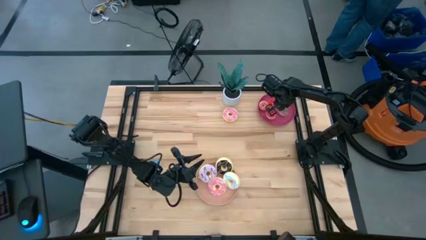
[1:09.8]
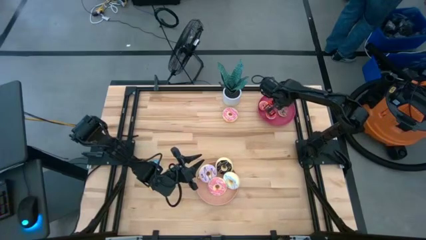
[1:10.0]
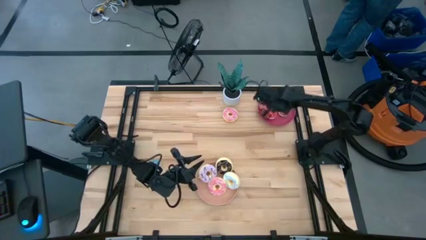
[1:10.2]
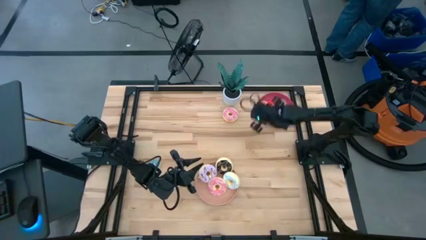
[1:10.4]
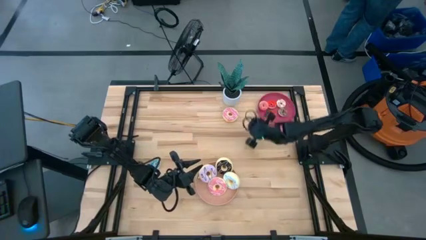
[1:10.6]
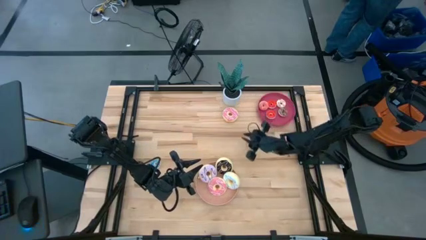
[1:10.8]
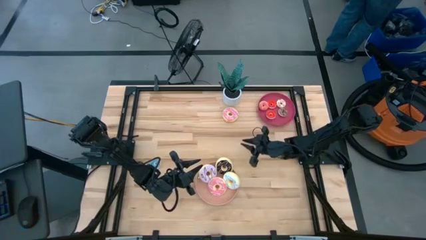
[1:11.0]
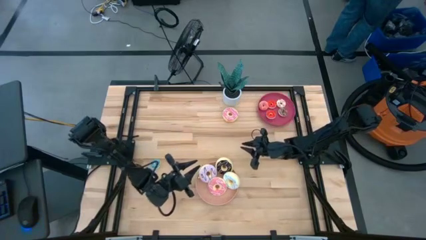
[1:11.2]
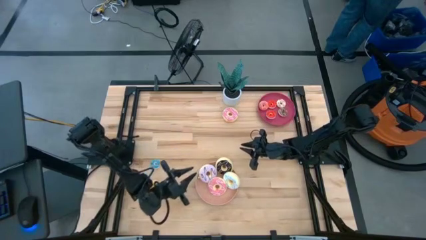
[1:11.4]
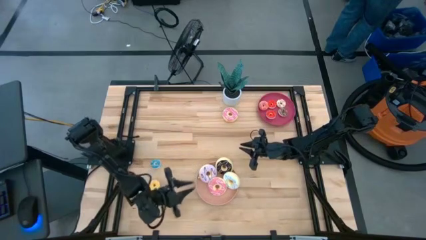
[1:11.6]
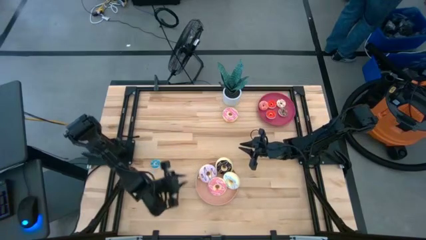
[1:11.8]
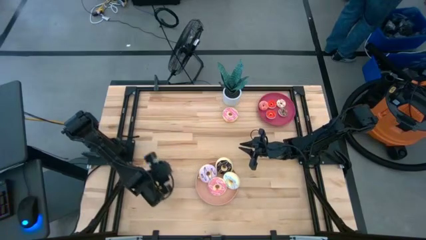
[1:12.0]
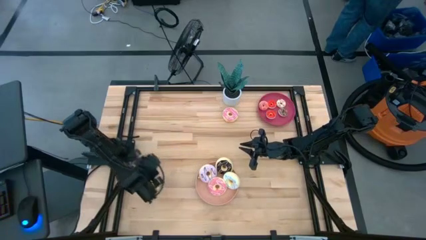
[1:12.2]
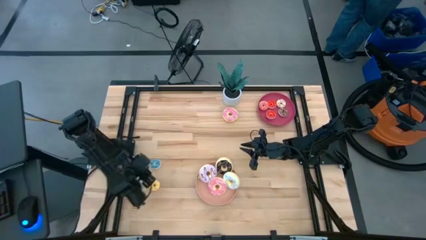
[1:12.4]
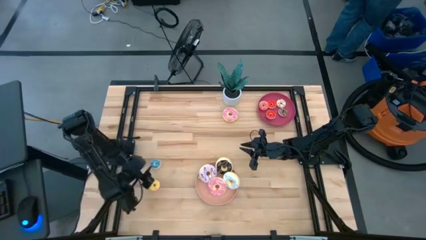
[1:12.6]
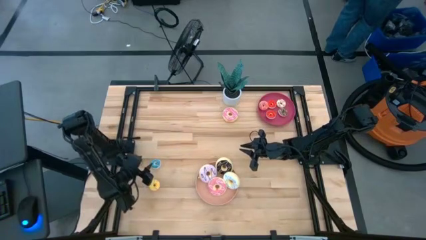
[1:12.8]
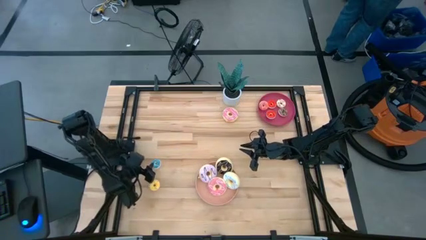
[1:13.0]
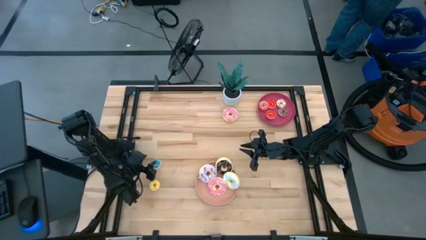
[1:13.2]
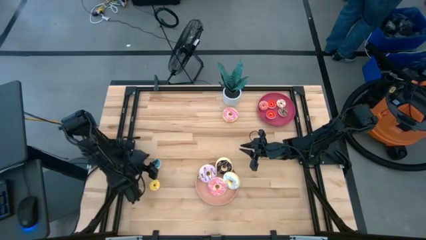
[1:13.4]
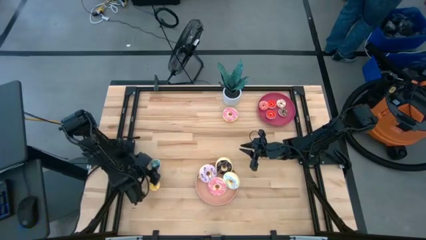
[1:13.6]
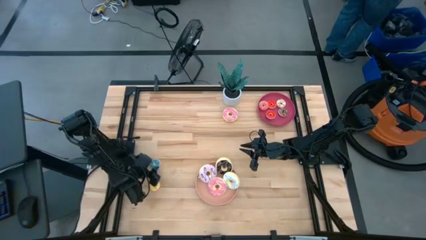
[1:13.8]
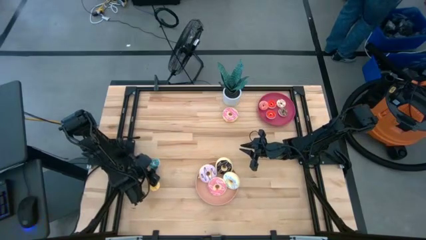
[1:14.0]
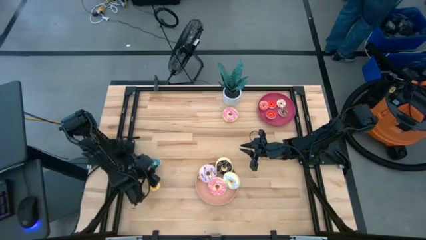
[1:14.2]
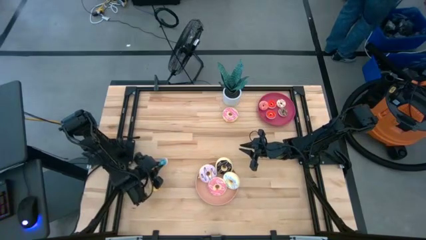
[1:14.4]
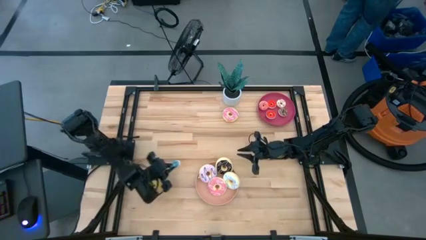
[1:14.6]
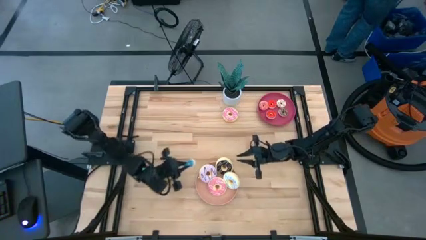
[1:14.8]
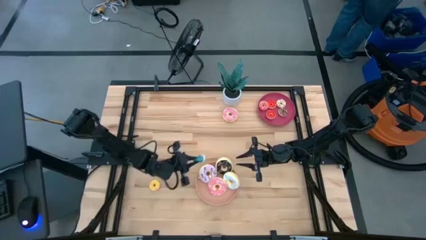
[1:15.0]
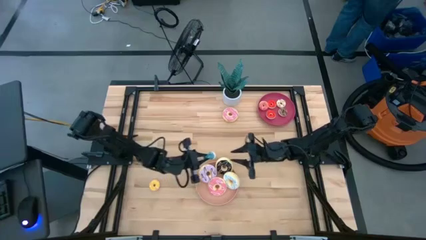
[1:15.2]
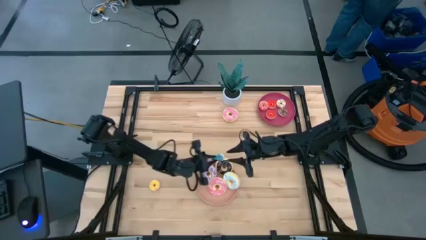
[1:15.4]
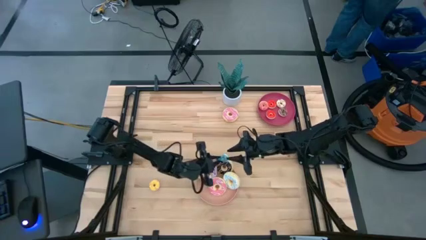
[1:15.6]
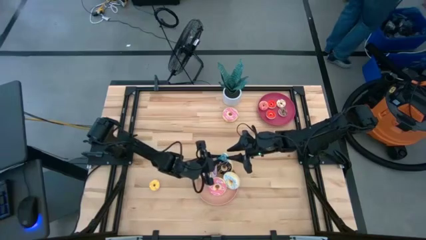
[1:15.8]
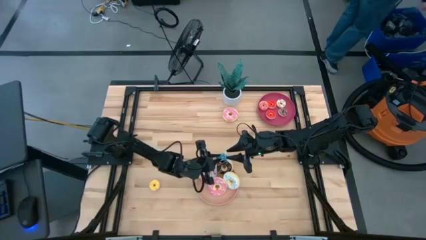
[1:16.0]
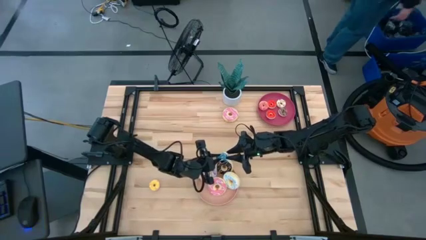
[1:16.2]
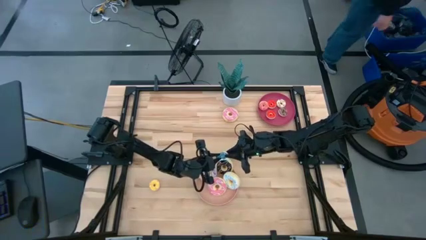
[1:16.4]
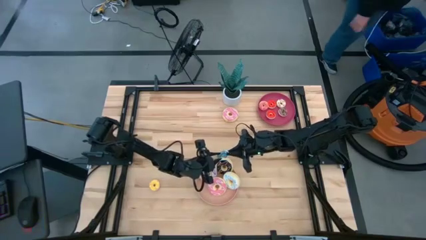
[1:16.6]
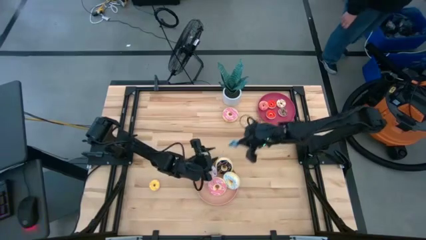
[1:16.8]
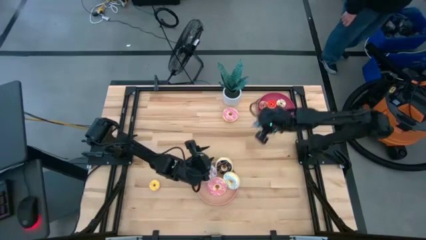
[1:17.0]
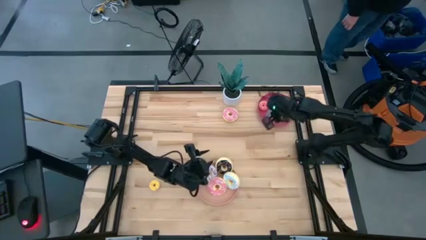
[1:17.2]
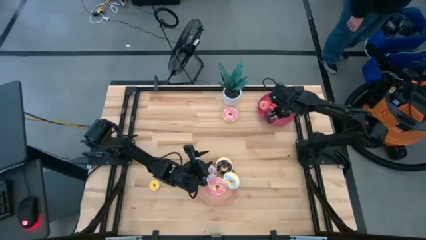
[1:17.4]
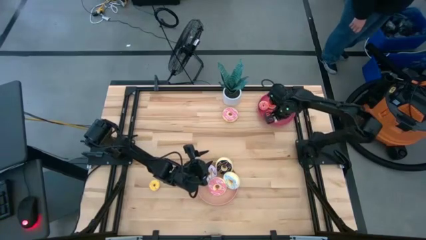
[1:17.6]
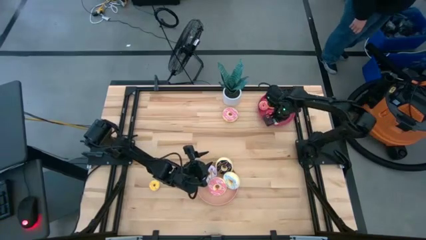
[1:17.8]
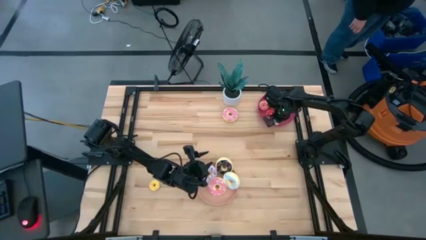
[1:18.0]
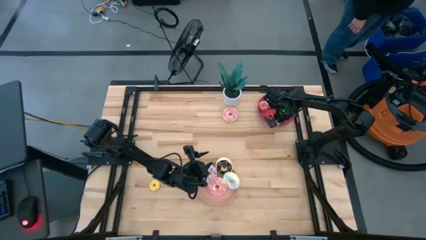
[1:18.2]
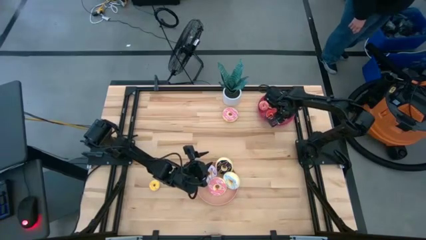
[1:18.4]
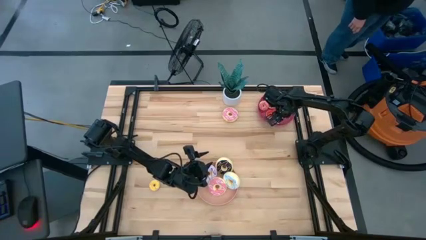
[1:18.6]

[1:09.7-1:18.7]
Task: Pick & Place donuts
Put the small blue donut on the red plate

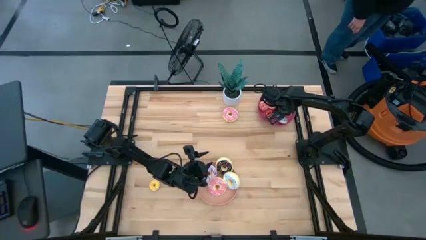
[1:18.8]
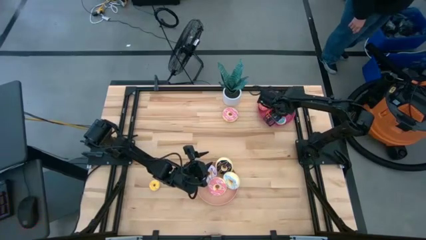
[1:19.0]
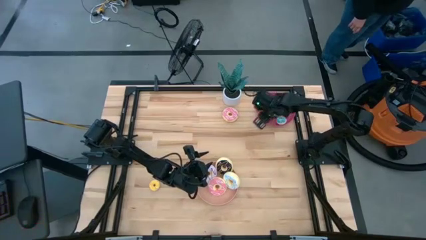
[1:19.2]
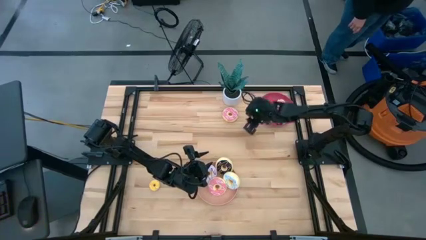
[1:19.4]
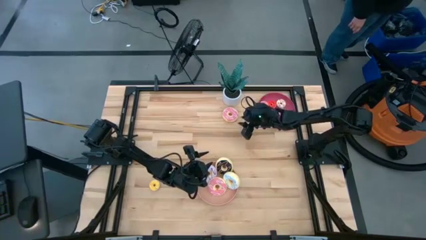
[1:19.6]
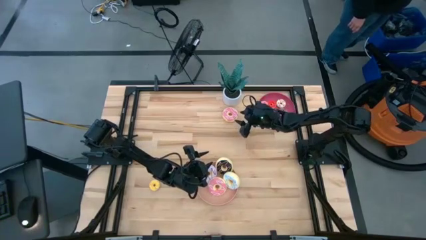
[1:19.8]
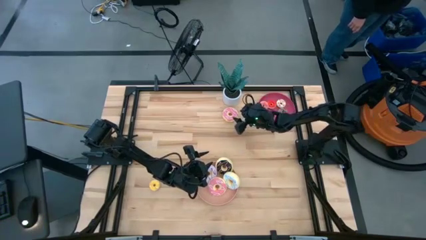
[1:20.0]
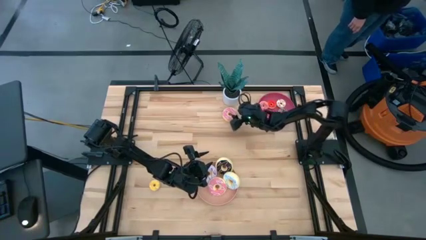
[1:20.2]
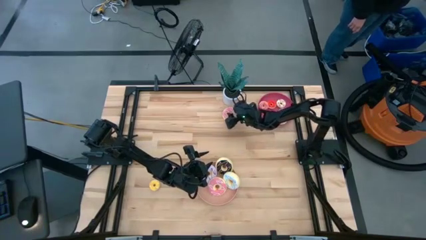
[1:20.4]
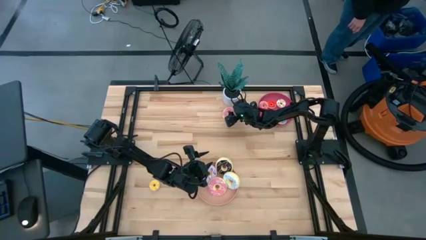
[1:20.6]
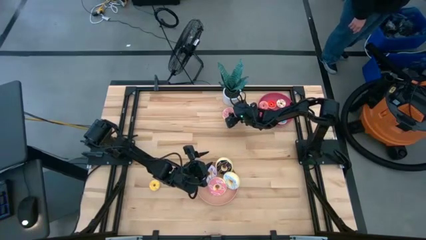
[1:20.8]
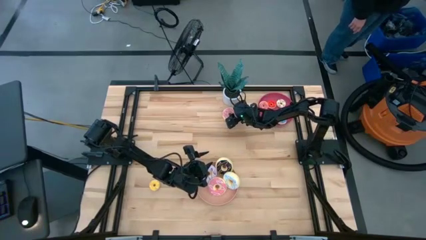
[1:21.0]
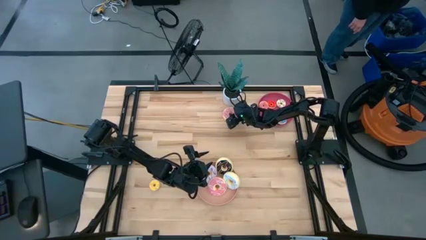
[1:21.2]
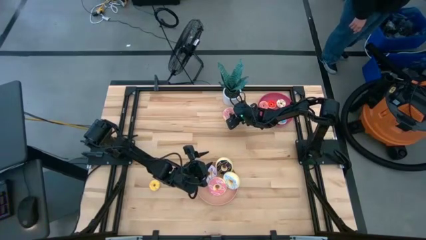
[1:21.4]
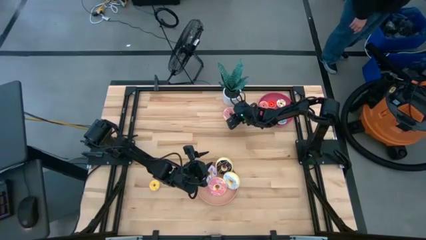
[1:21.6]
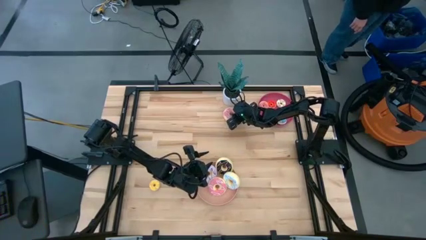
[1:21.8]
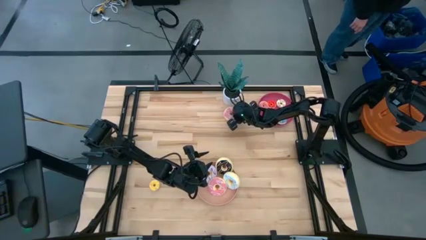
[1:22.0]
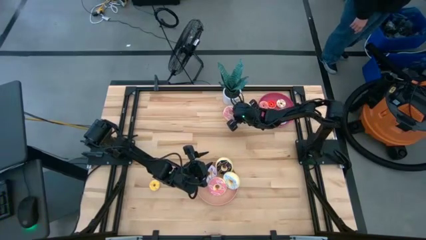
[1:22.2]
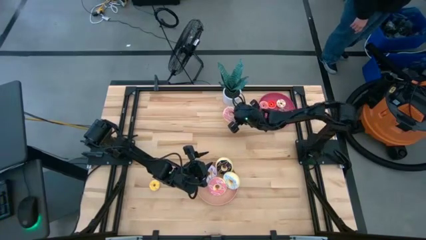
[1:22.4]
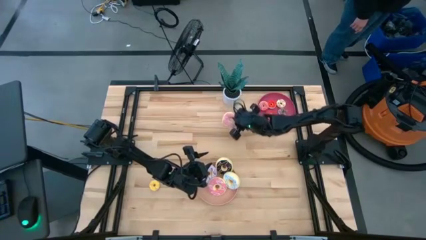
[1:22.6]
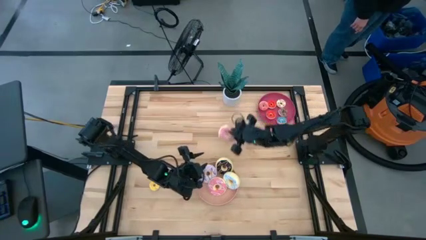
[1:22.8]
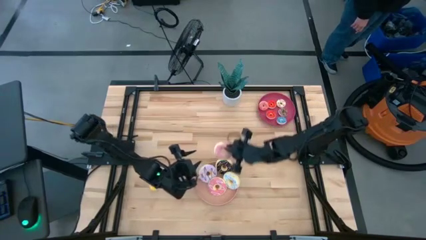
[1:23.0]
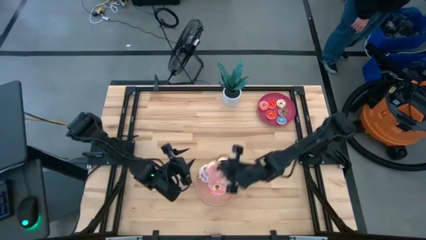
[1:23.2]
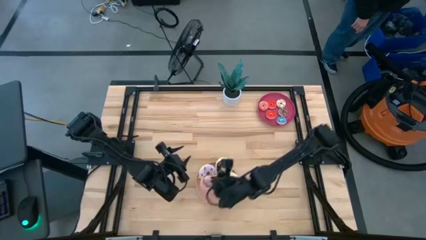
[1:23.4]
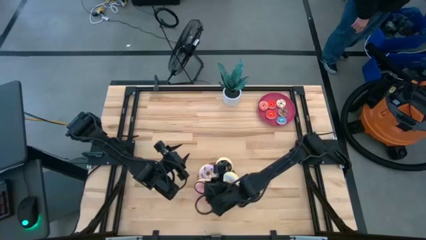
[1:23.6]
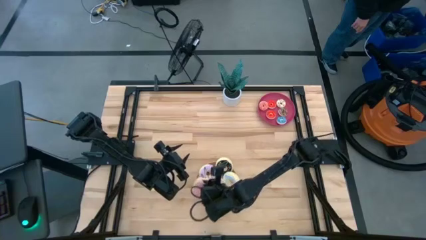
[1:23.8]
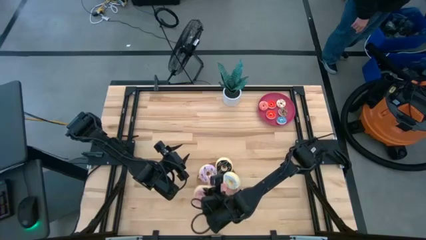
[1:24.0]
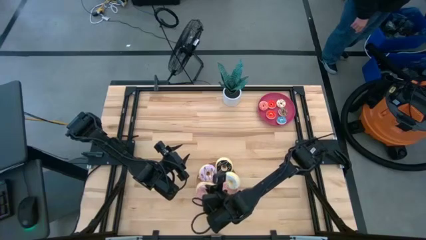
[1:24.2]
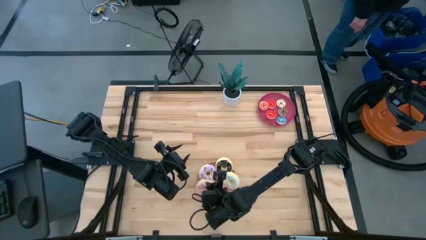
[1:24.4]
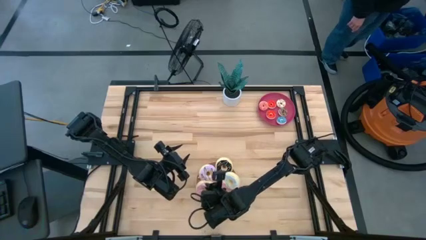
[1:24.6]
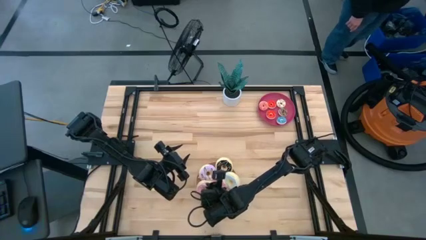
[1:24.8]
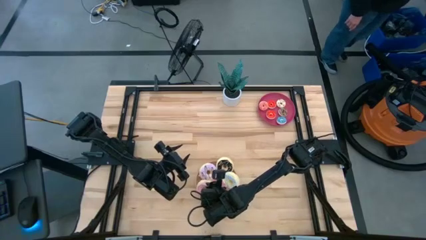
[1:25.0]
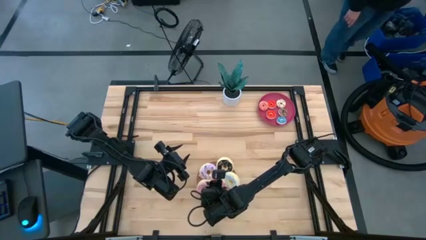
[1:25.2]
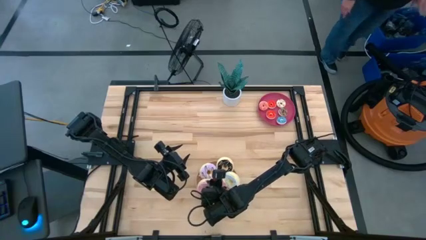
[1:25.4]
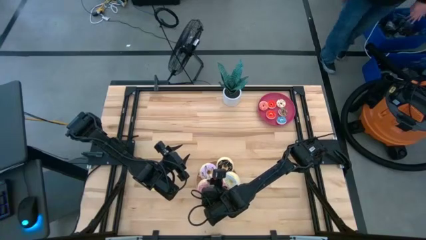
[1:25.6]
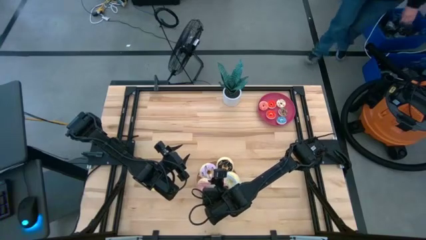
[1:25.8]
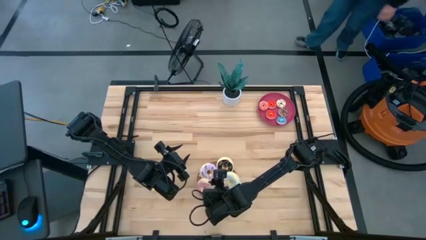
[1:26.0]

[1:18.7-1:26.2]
Put the large pink donut on the pink plate

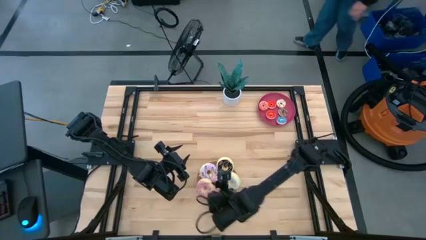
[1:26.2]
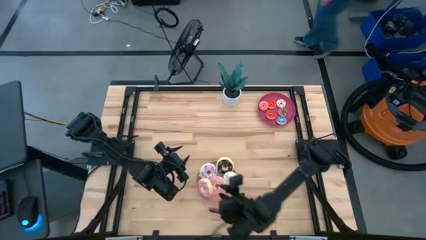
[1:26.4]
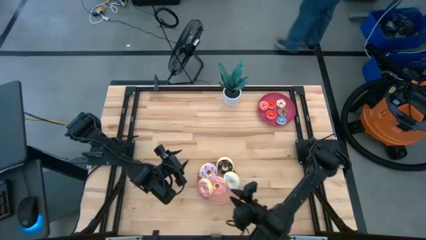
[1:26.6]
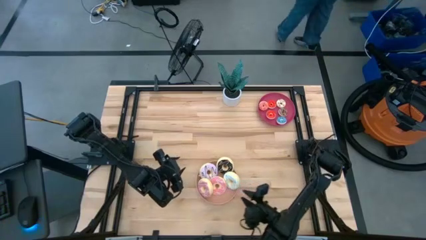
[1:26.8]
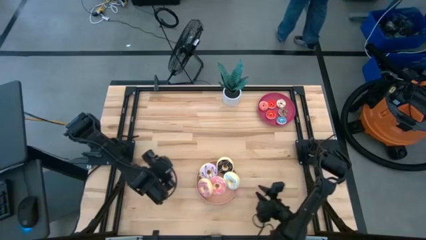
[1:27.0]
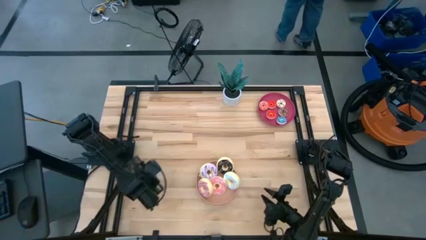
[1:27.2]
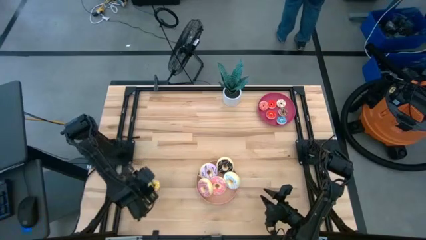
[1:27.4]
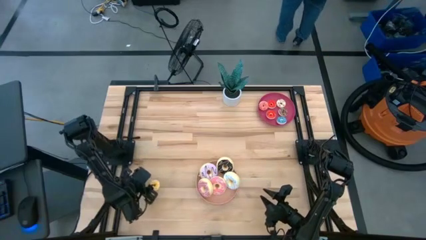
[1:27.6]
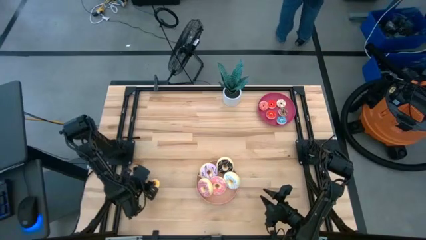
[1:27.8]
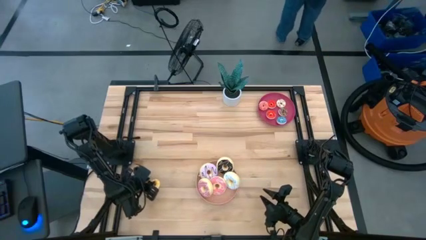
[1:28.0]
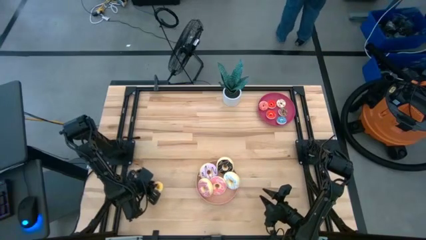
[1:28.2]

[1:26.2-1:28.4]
Put the small yellow donut on the red plate
